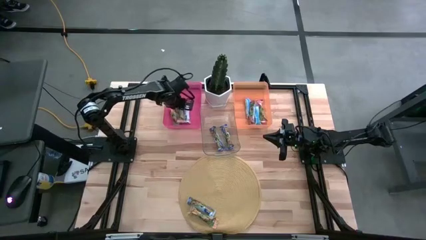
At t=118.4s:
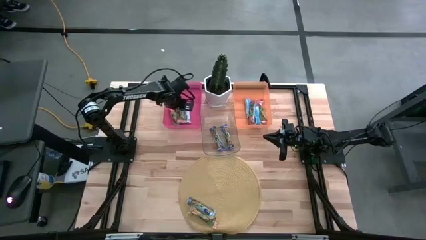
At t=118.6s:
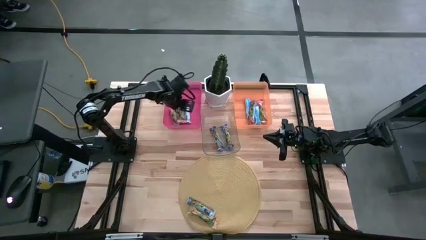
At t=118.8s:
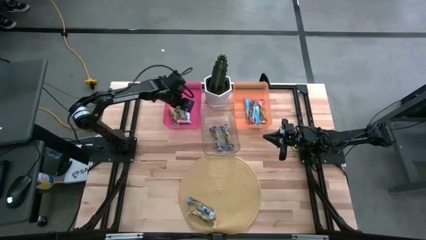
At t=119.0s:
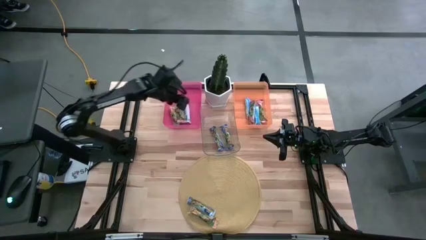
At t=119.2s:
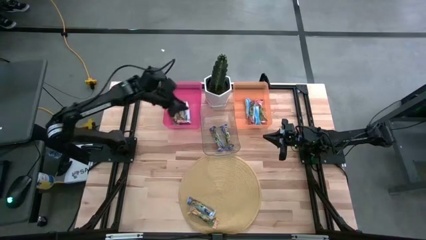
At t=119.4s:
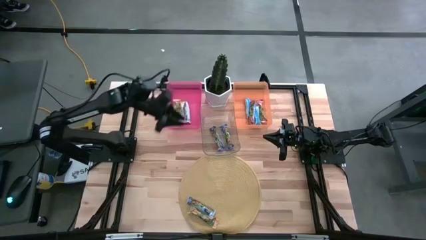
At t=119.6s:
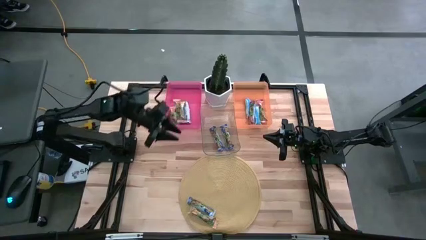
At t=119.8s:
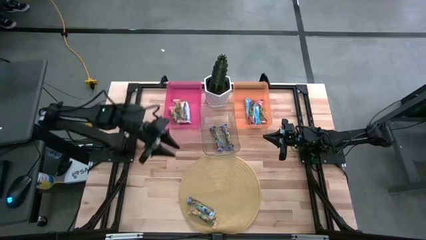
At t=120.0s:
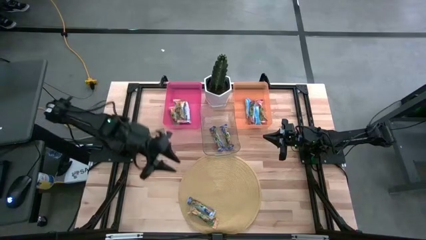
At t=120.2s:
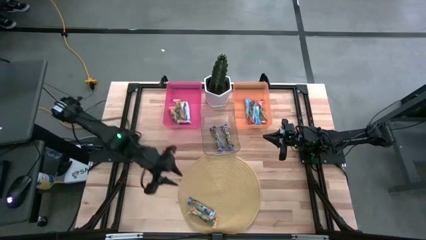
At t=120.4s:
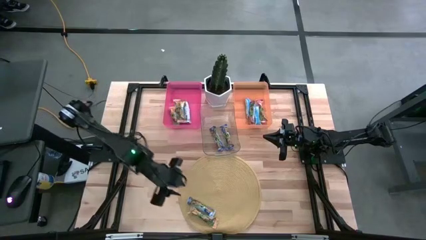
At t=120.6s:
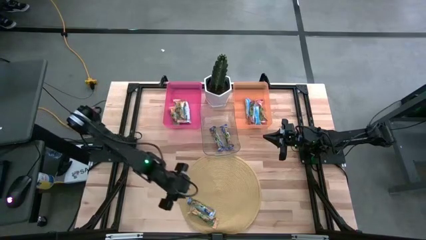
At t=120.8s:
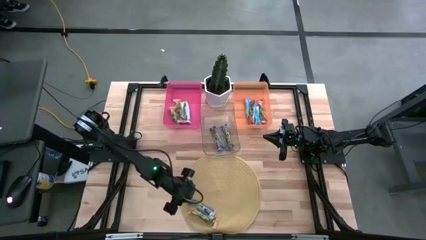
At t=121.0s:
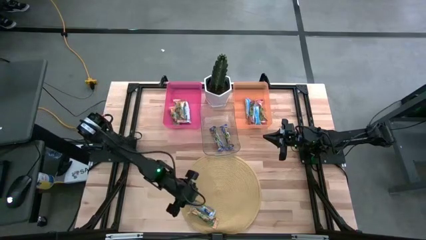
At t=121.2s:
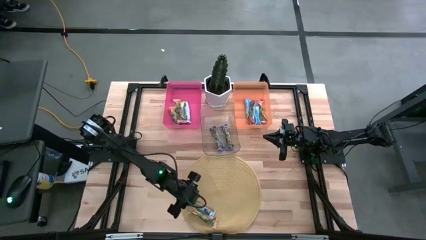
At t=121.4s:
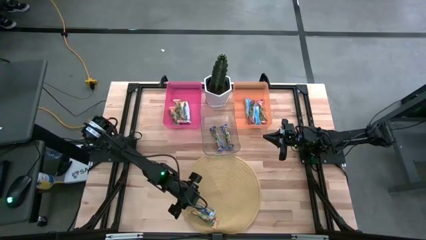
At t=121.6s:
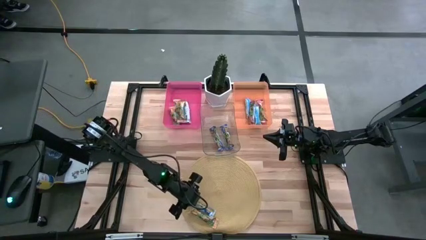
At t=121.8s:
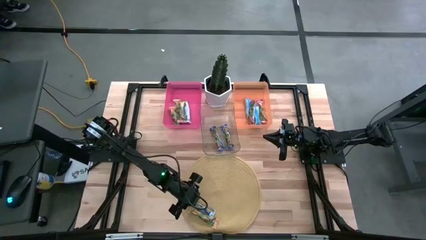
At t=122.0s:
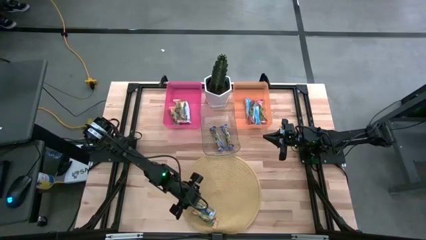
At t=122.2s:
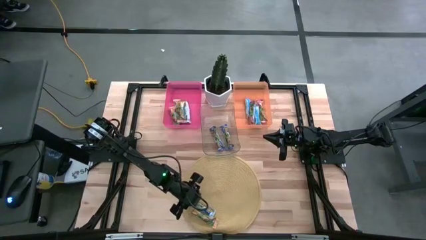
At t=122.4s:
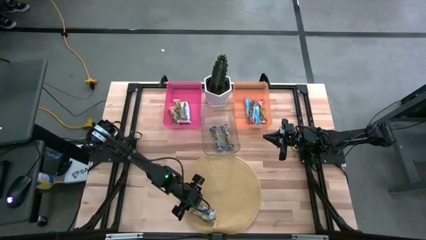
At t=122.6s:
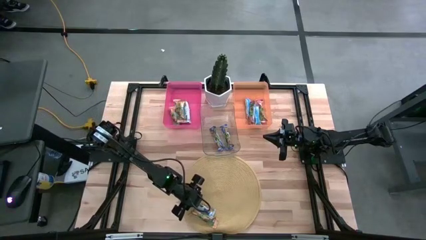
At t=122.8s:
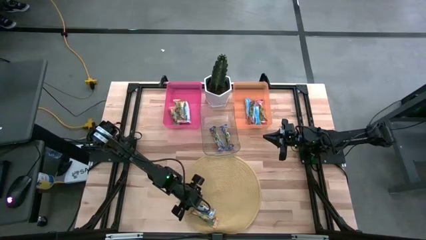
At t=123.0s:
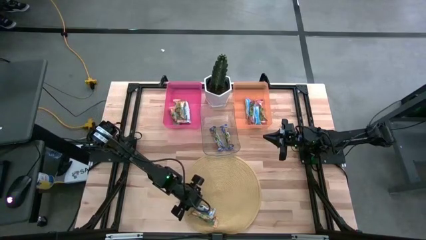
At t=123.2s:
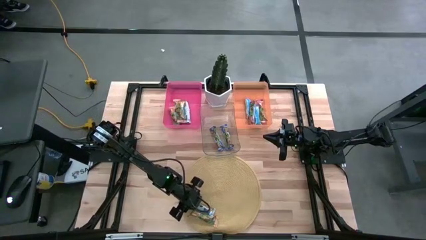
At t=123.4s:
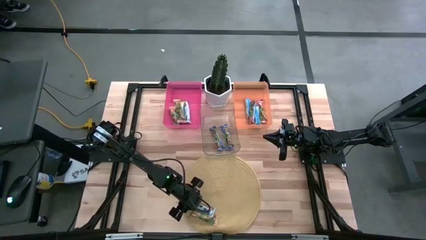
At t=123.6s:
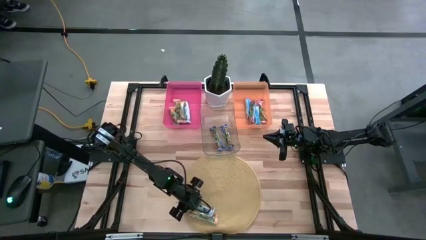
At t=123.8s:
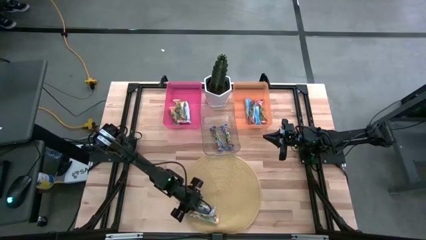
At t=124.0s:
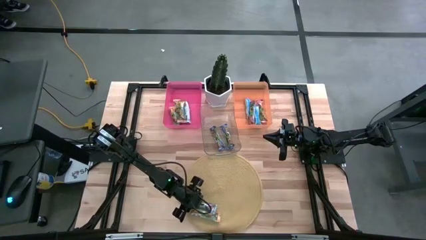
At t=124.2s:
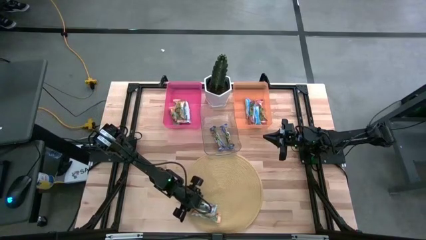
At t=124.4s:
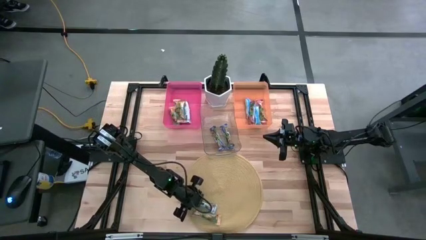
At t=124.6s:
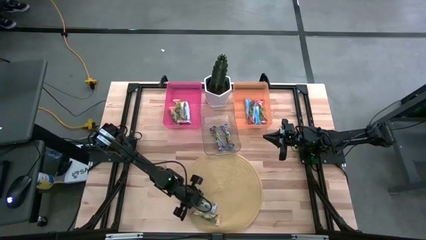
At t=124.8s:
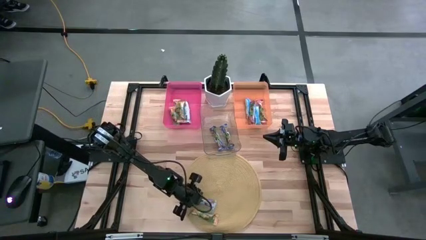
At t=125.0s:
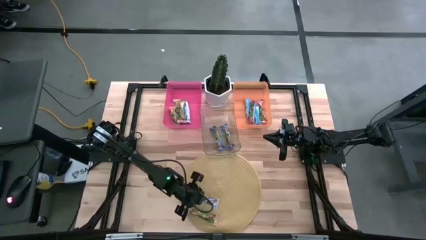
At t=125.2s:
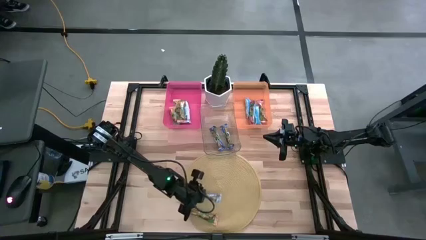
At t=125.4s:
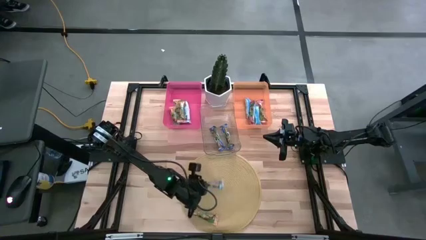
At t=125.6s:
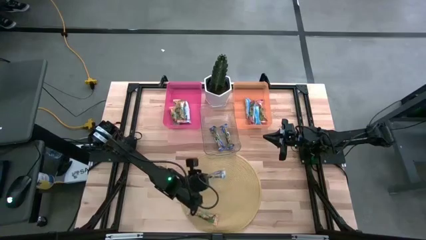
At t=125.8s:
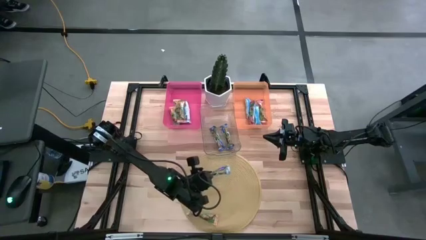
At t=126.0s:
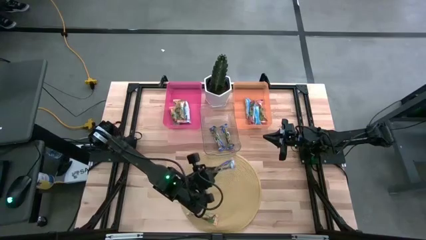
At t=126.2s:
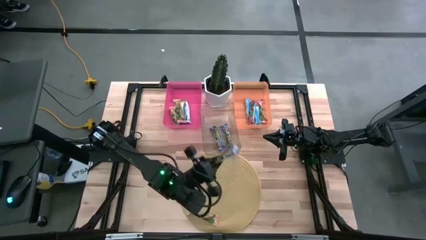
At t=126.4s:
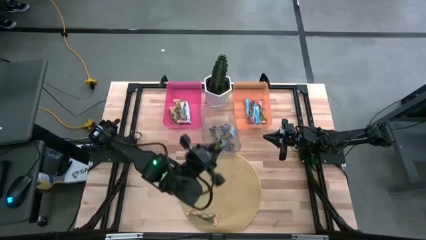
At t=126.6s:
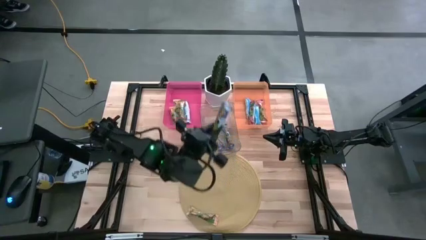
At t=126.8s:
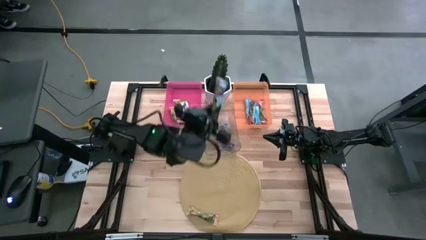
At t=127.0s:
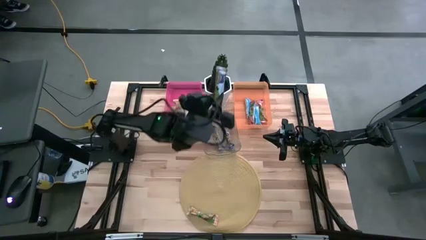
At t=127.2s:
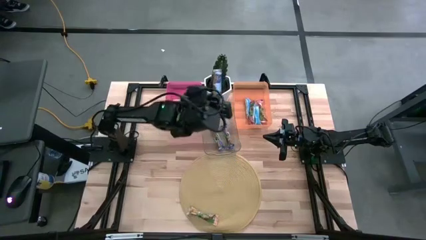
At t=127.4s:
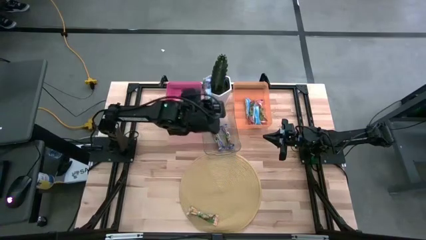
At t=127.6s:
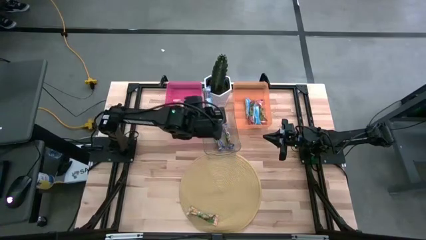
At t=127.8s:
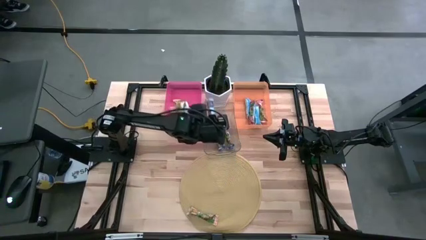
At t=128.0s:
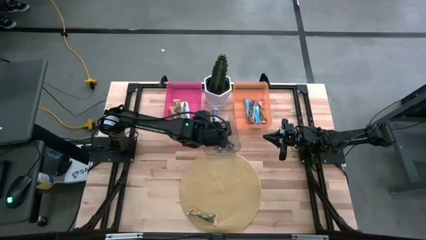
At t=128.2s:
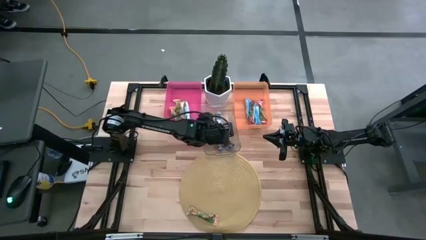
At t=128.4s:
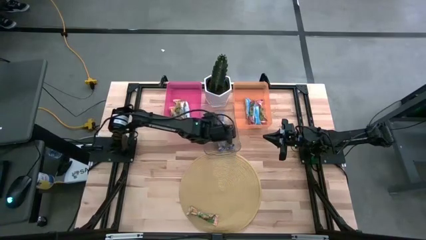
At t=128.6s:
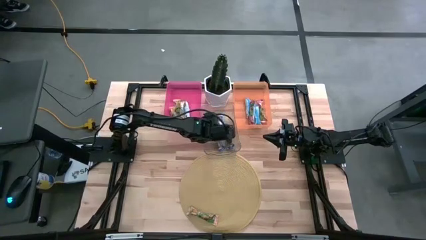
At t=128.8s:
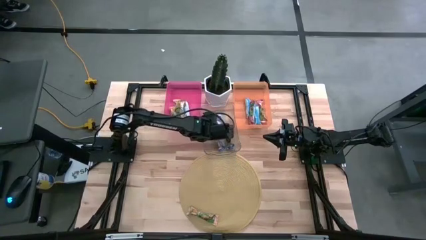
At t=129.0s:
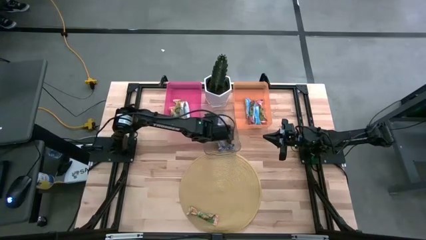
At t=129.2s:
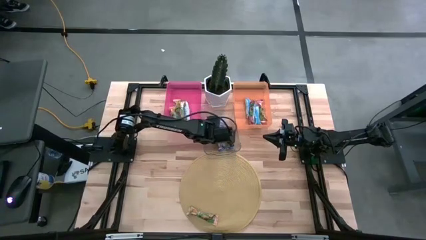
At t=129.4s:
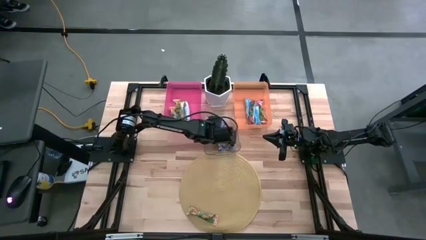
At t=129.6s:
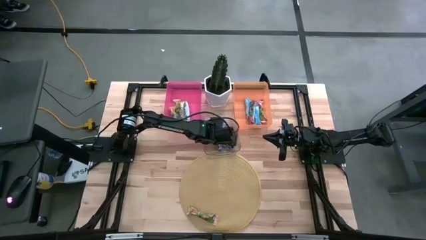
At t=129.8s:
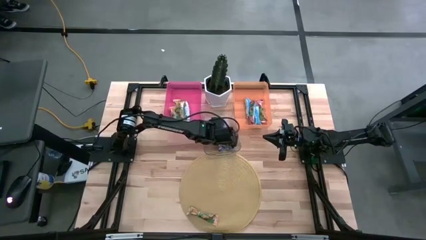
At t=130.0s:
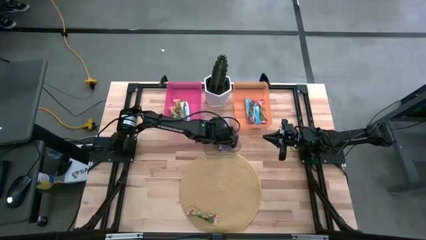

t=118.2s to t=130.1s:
Task: Pick and place Granola Bars by type
Put the blue granola bar into the transparent bin

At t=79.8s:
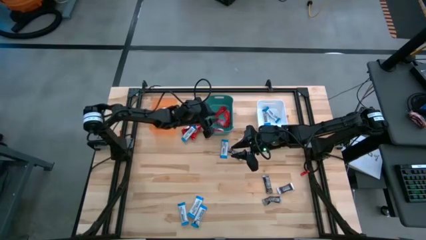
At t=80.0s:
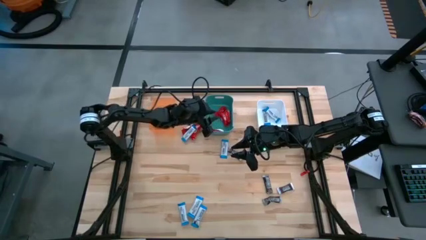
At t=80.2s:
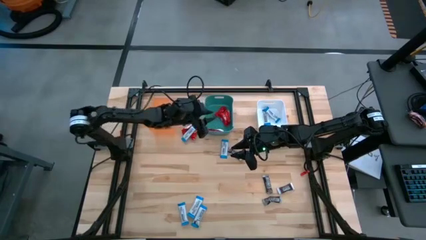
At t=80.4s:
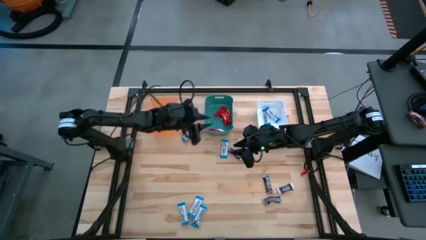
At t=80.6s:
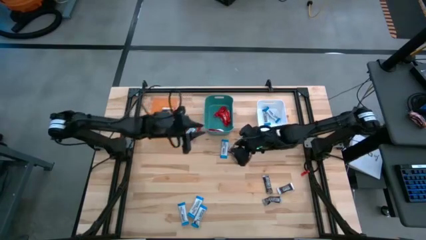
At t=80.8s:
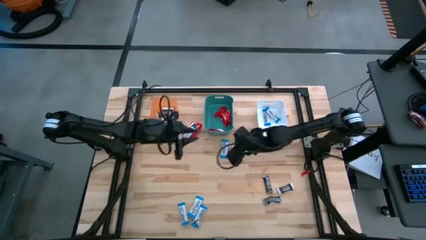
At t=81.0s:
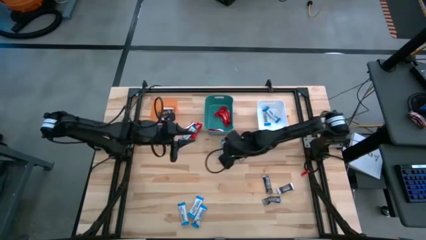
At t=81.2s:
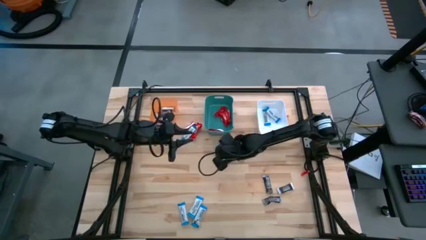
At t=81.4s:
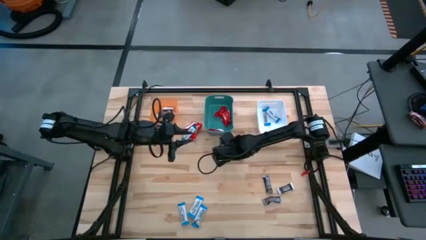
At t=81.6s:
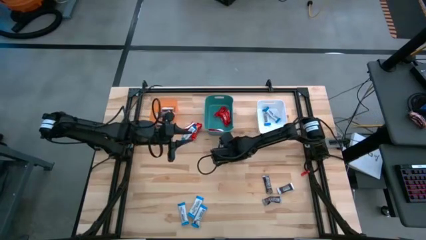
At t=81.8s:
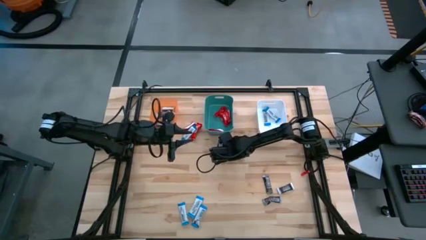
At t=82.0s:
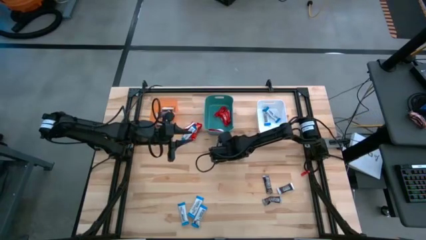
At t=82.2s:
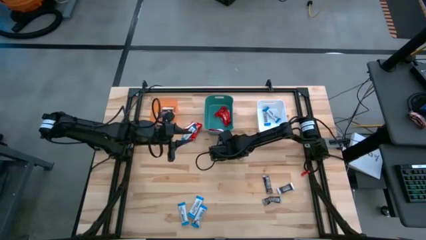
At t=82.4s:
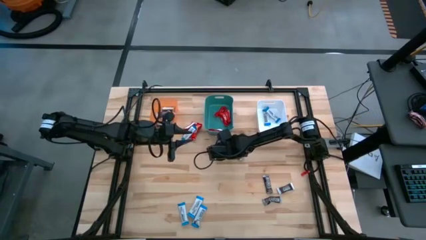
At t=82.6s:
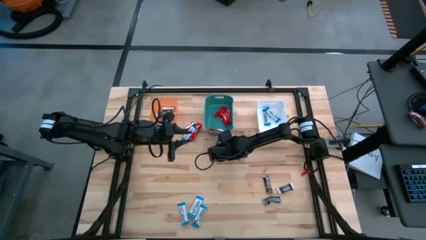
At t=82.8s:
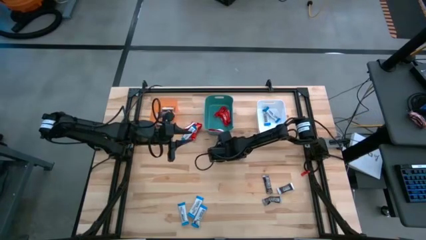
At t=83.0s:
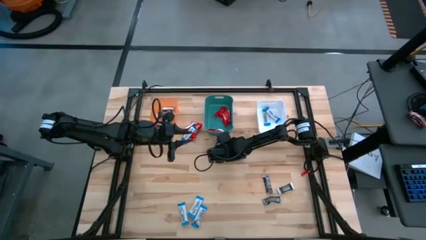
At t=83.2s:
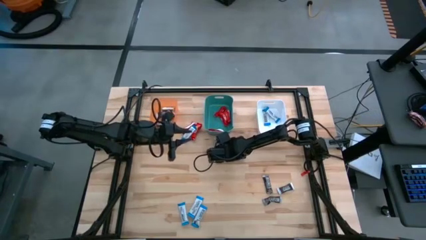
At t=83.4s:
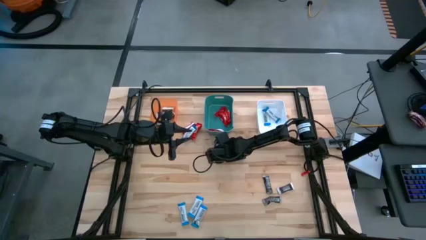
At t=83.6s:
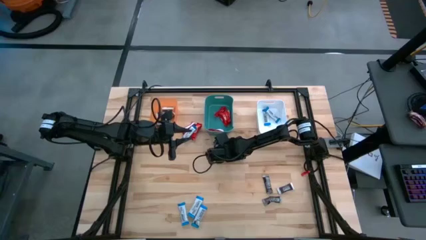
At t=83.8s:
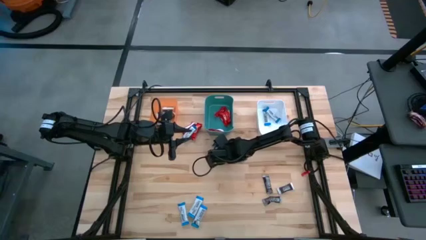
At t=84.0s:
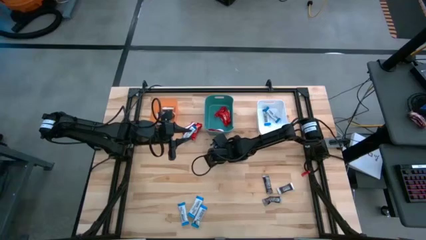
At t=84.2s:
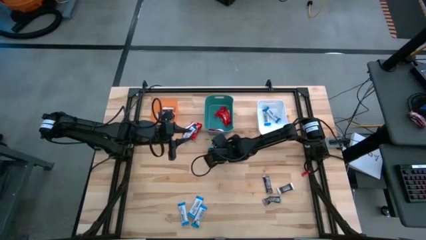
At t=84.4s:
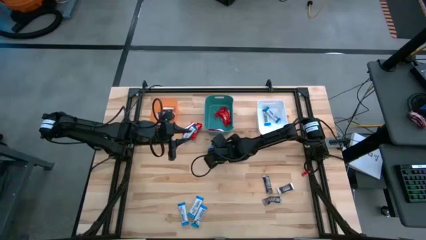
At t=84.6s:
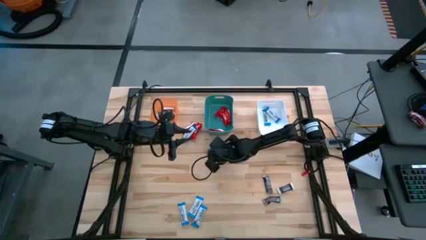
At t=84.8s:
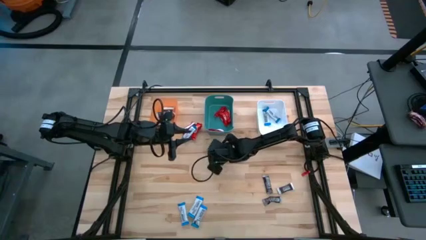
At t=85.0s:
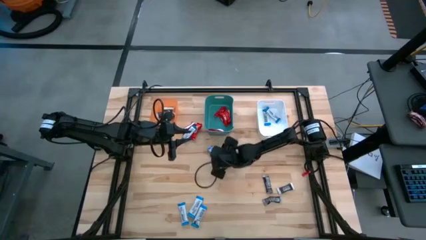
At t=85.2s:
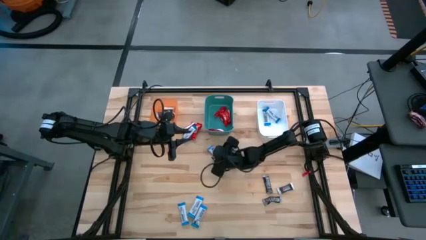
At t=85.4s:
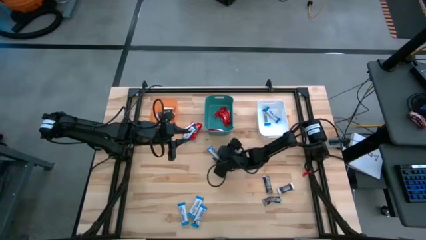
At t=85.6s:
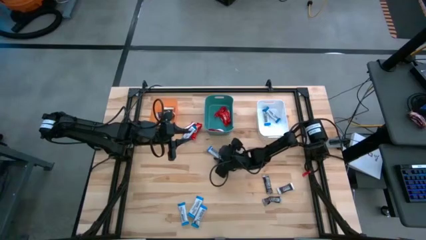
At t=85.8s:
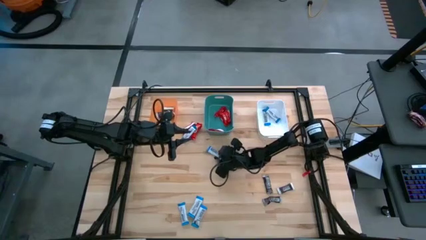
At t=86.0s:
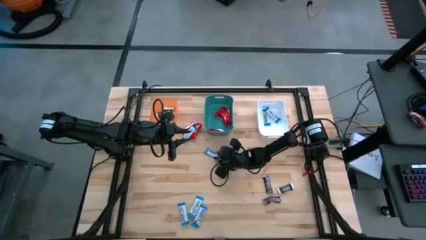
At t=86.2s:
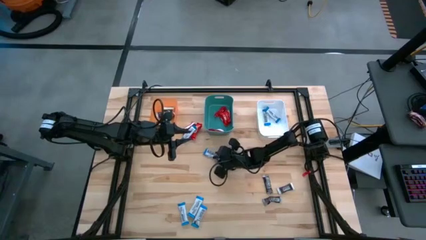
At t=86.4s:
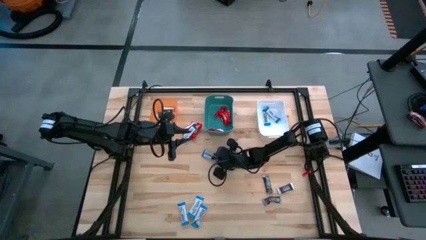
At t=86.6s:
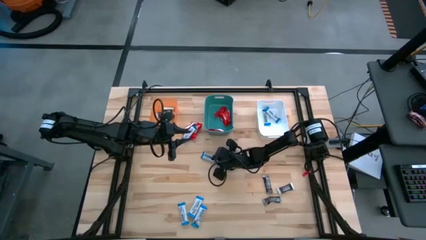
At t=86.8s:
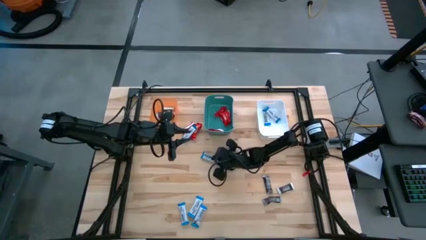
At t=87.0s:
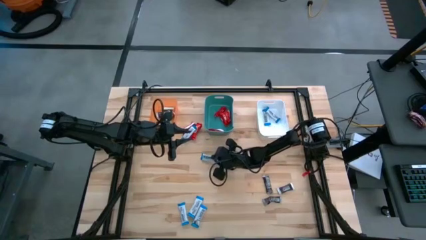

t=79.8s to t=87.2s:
Task: Organize candy in baskets
Put the white chocolate bar into the white bin
